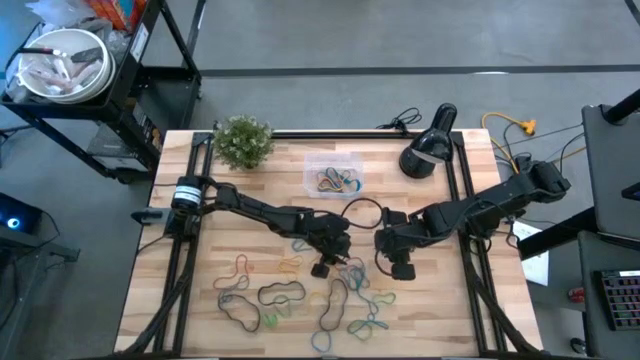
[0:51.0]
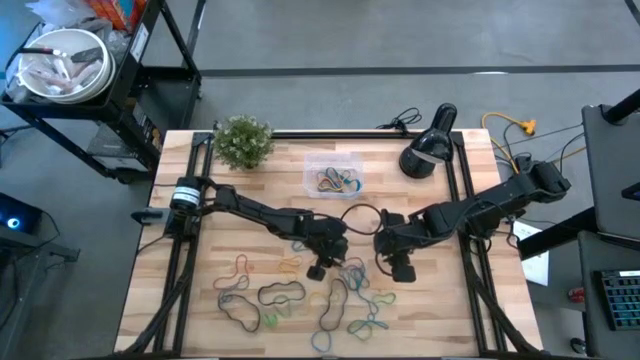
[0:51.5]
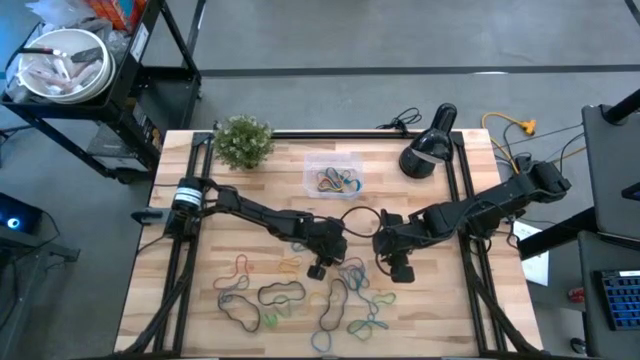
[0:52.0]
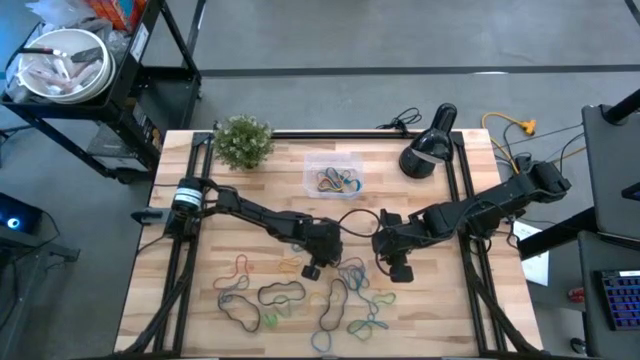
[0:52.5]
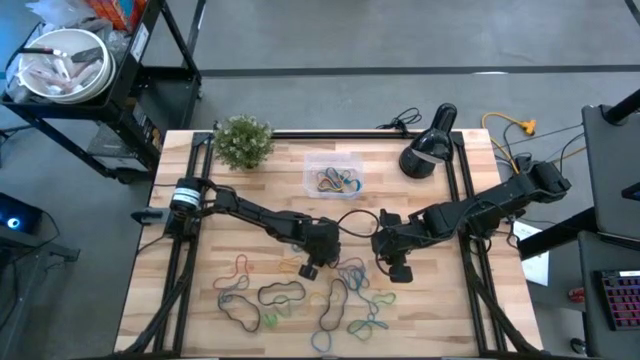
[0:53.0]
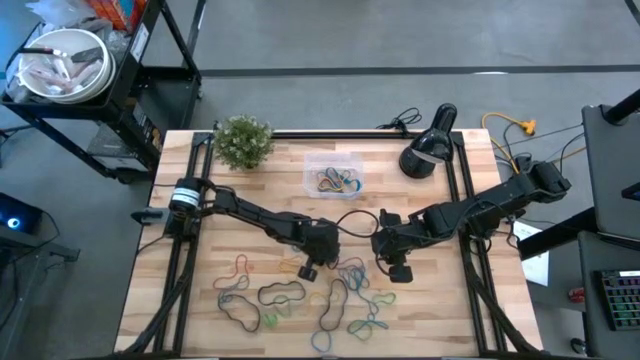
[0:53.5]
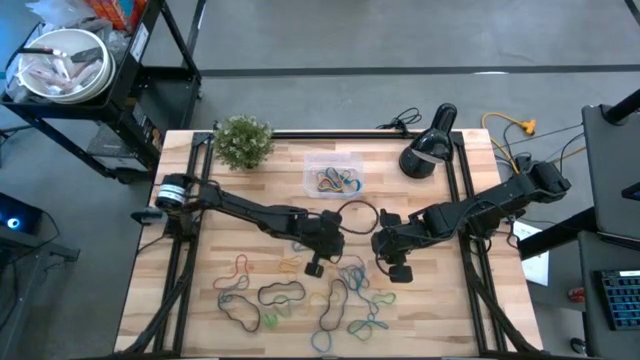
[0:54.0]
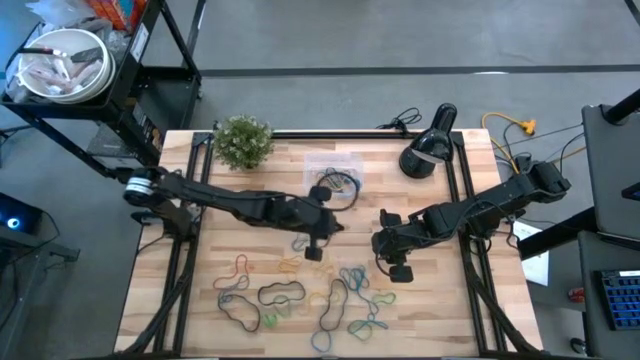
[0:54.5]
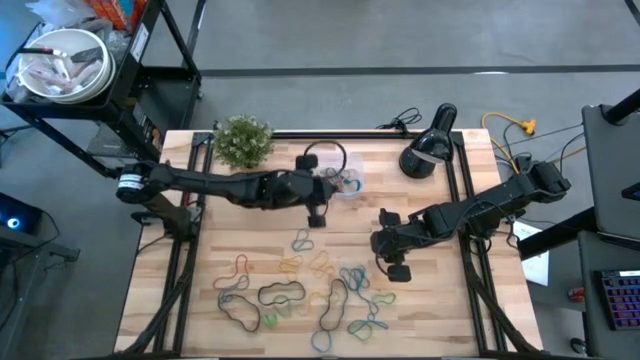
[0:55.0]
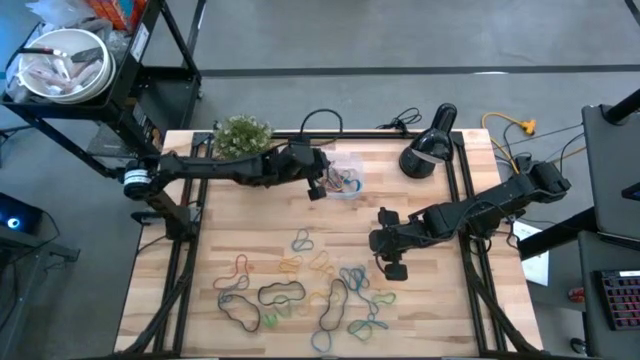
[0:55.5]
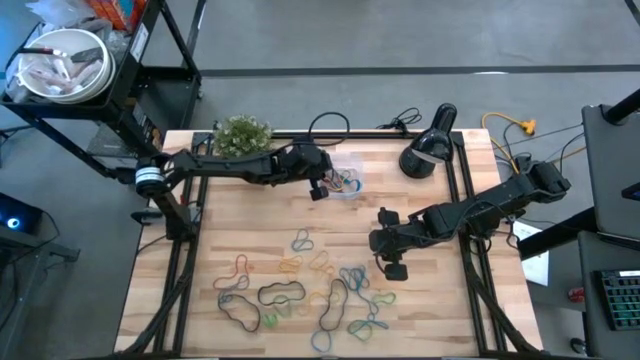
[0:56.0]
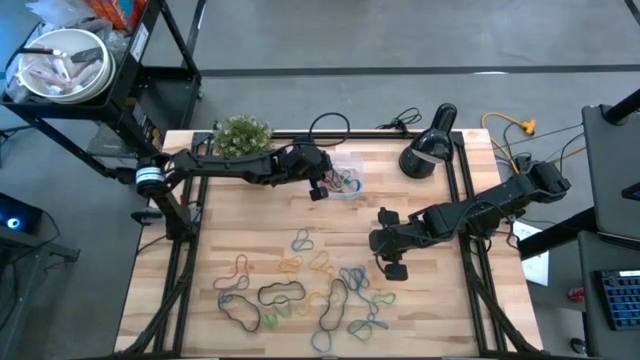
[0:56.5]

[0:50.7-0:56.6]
Task: Pick and place rubber bands into bin
Put the red rubberband into the transparent bin

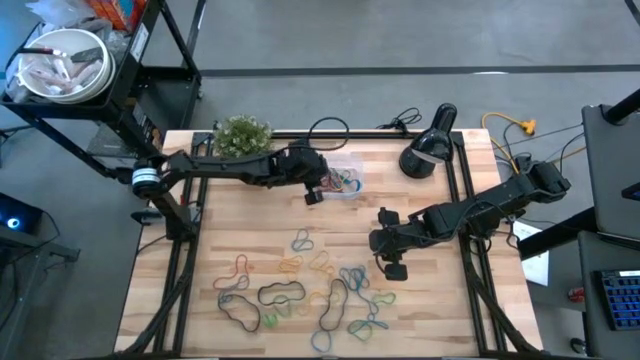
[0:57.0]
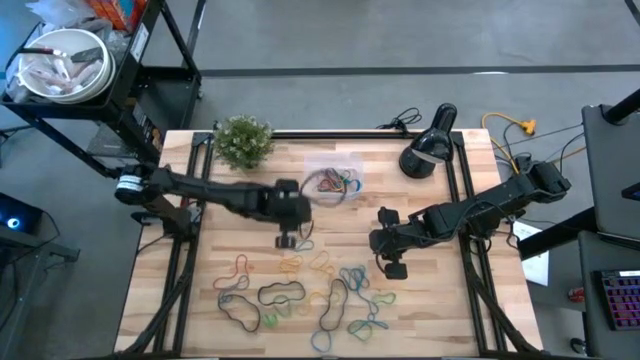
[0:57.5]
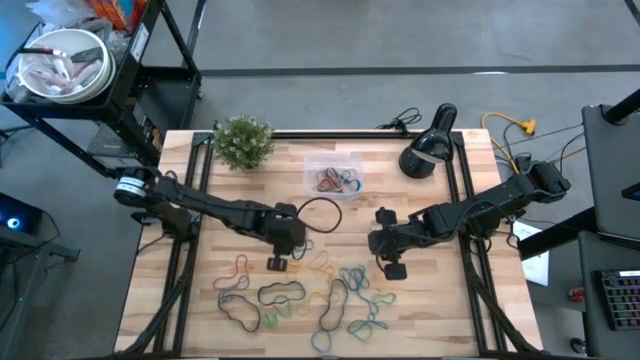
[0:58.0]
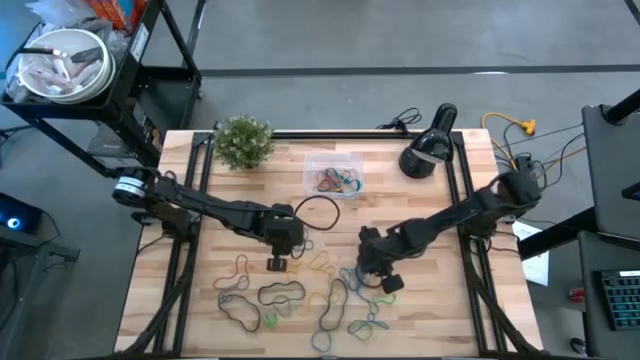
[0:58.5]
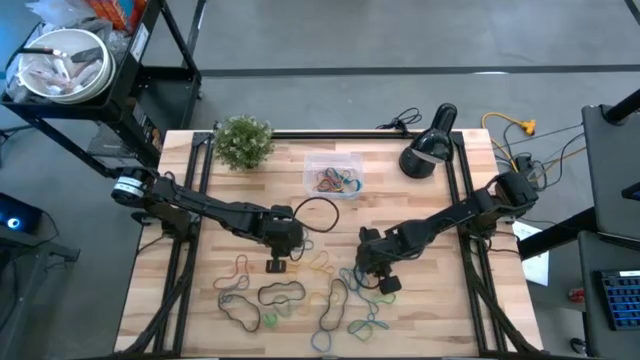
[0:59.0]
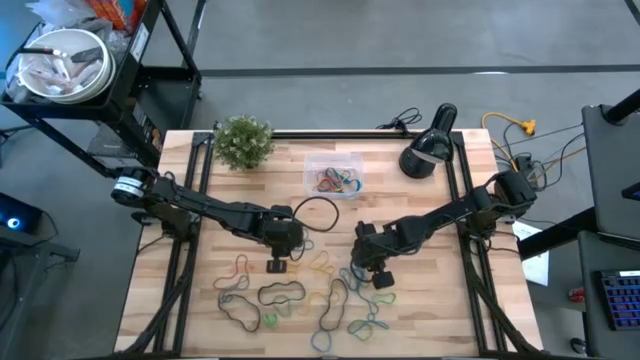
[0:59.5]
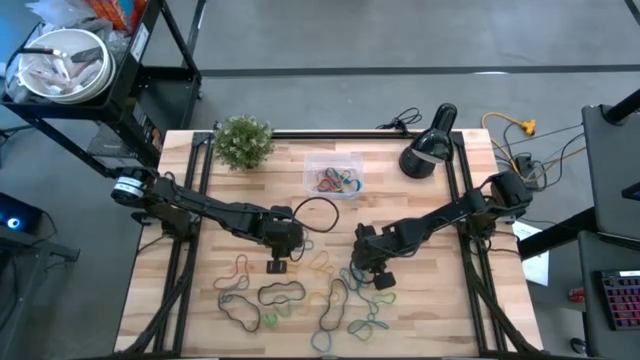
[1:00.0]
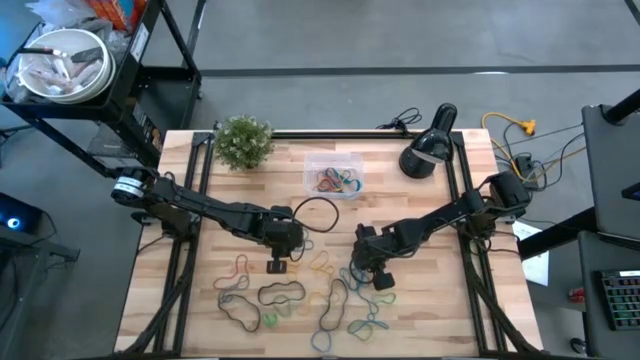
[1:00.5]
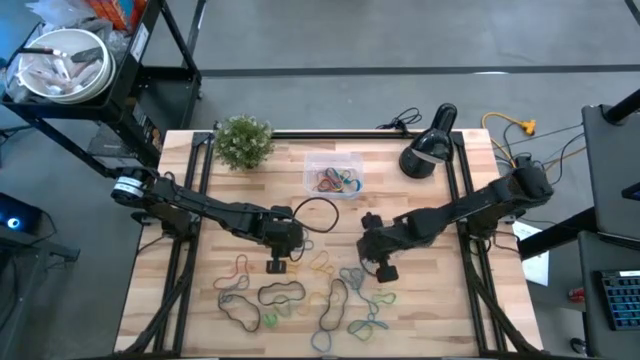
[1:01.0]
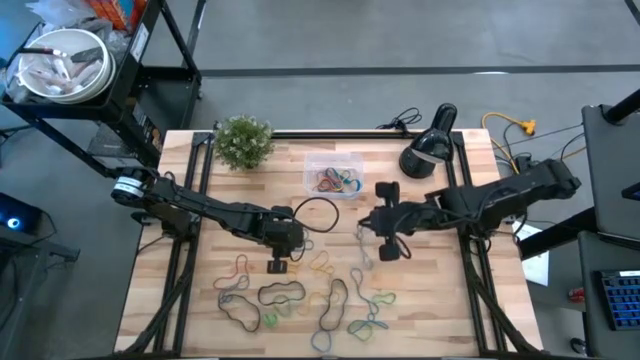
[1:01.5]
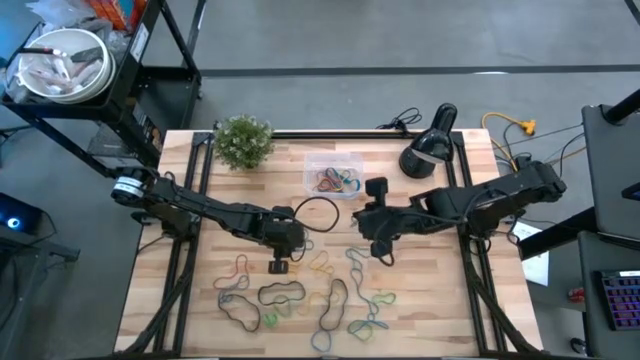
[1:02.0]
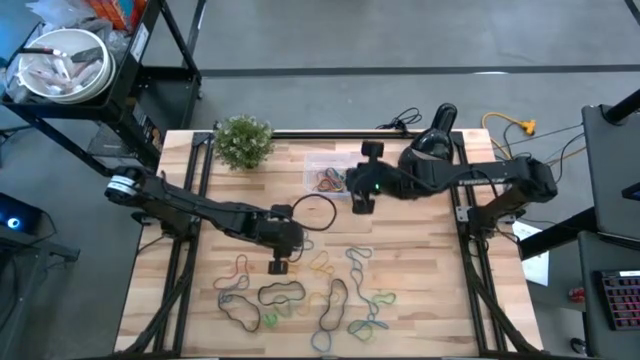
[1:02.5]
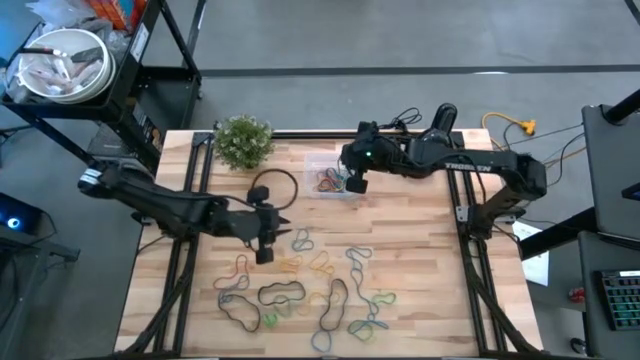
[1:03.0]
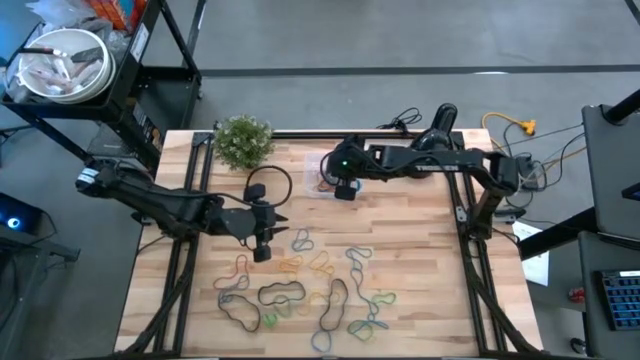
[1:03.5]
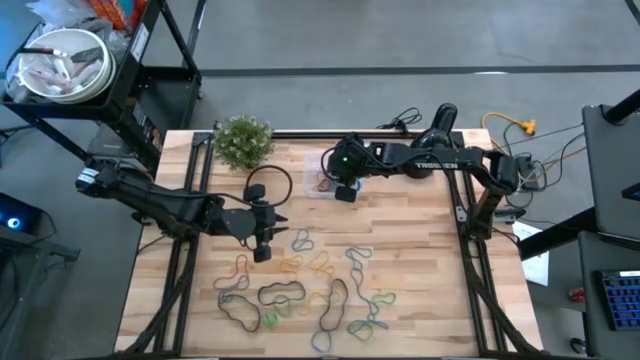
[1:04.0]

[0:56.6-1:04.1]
Put the blue rubberband into the transparent bin

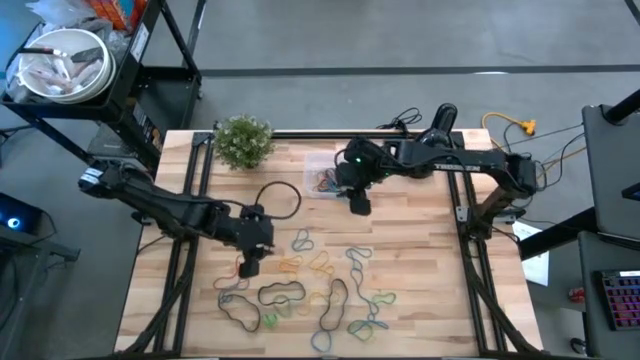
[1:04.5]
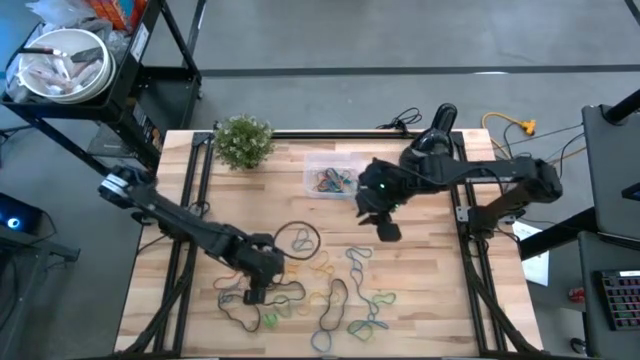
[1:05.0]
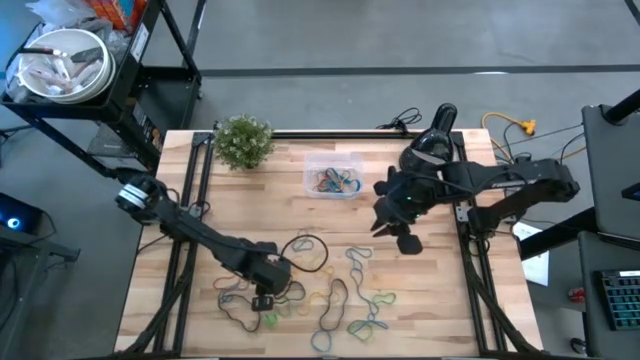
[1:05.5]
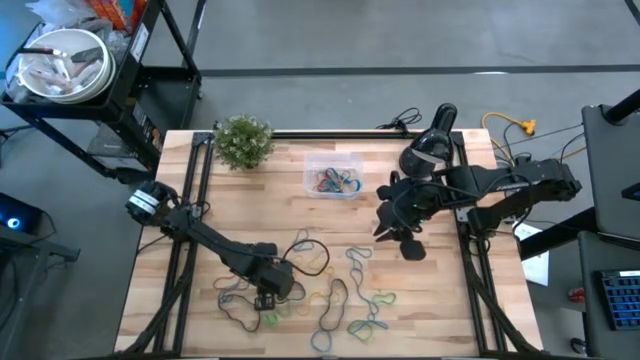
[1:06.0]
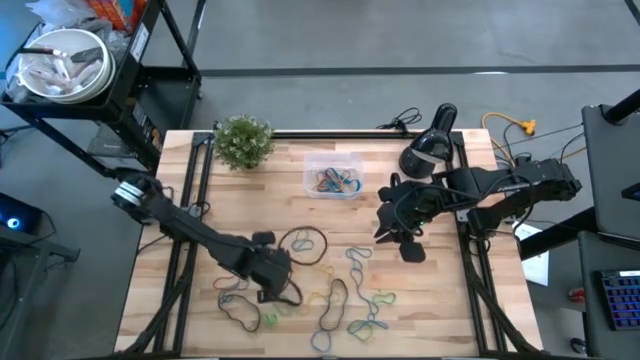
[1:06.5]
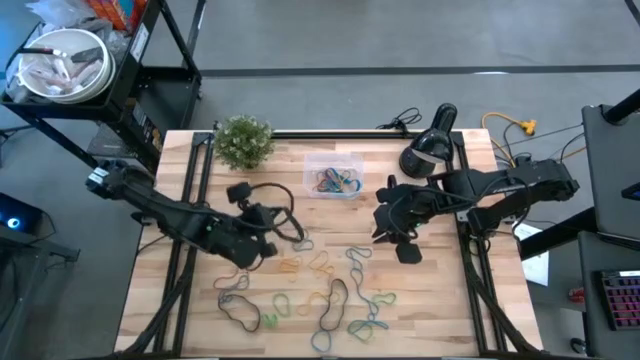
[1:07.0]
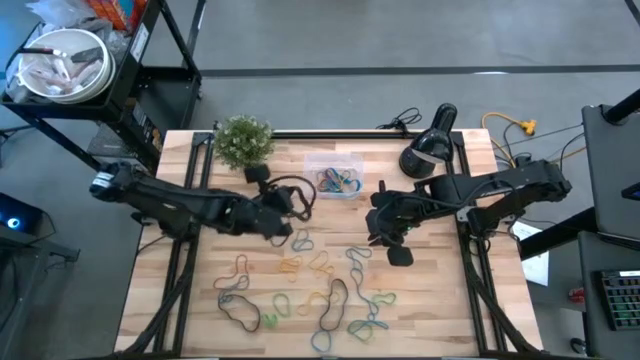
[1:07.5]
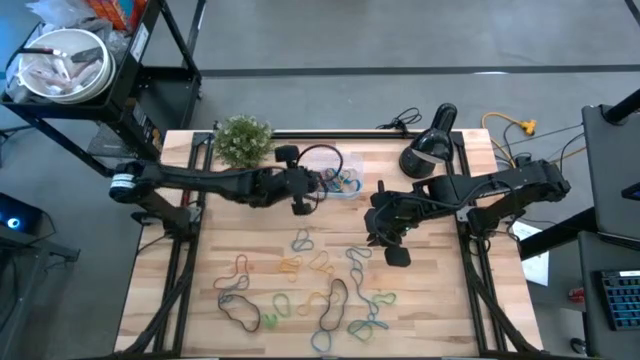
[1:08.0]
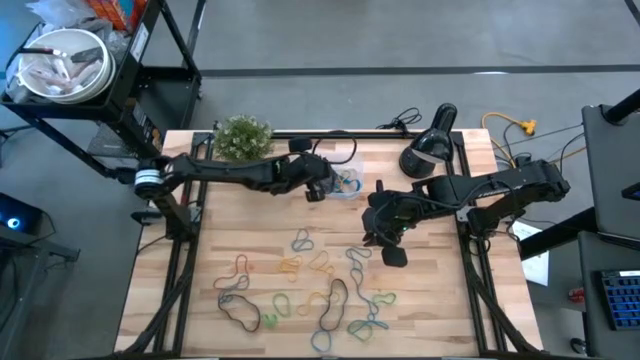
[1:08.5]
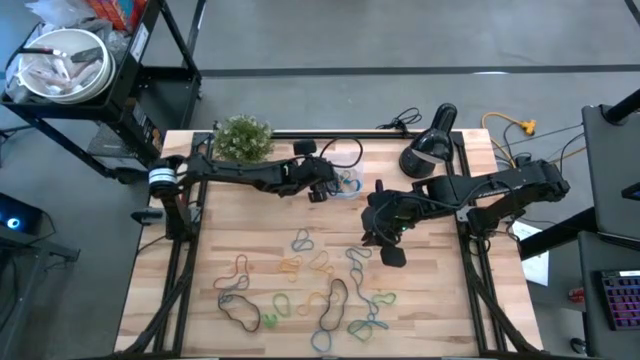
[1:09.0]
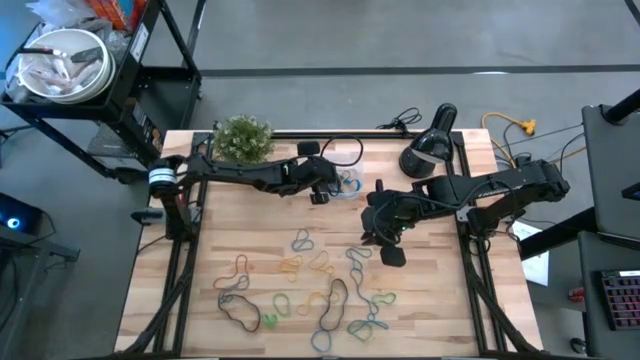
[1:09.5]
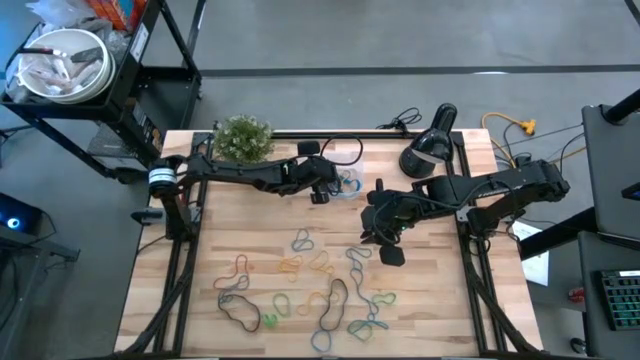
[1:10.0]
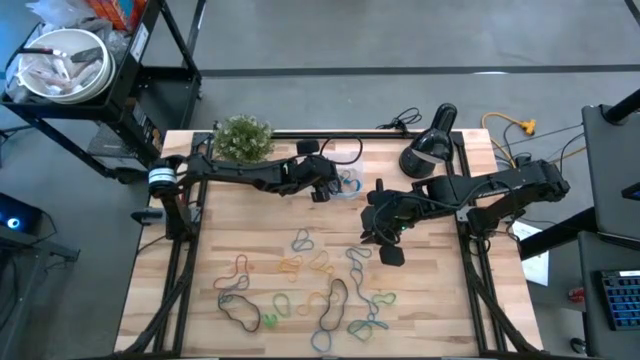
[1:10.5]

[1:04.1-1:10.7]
Put the black rubberband into the transparent bin

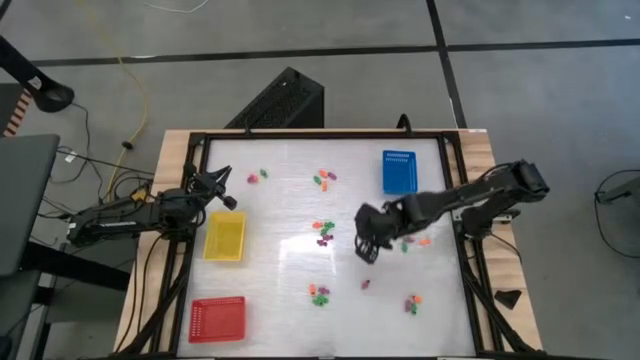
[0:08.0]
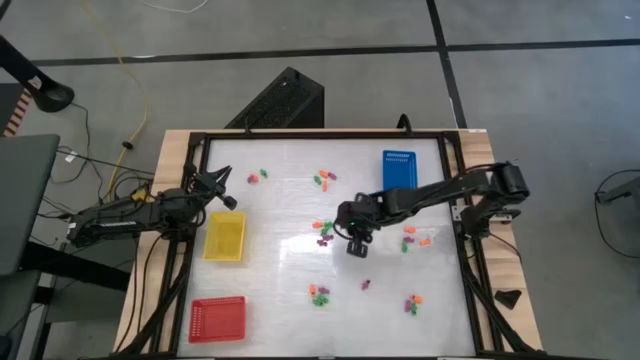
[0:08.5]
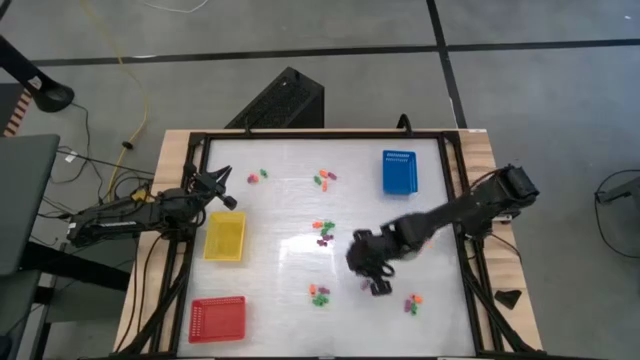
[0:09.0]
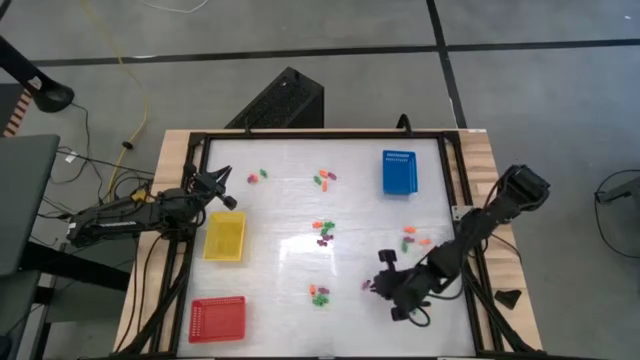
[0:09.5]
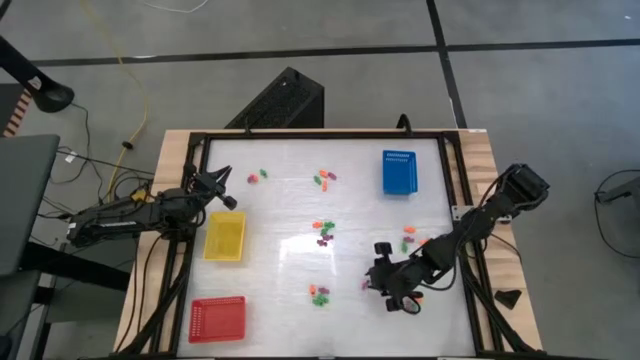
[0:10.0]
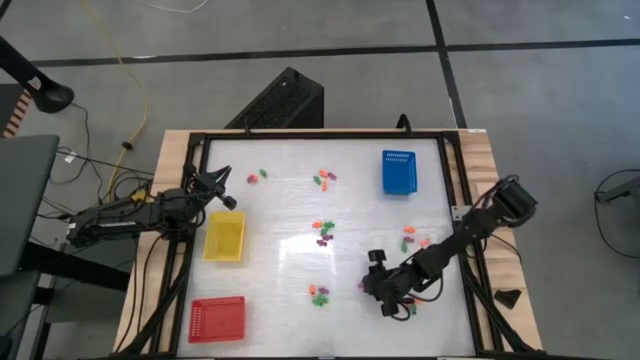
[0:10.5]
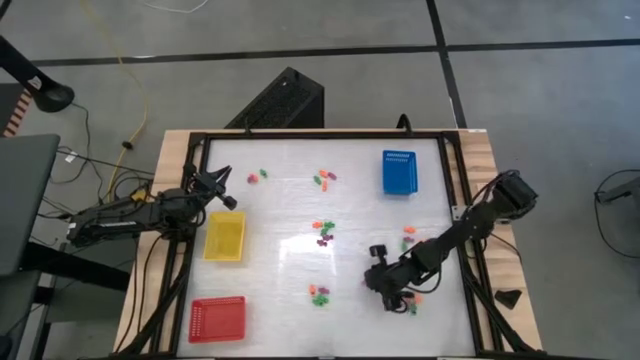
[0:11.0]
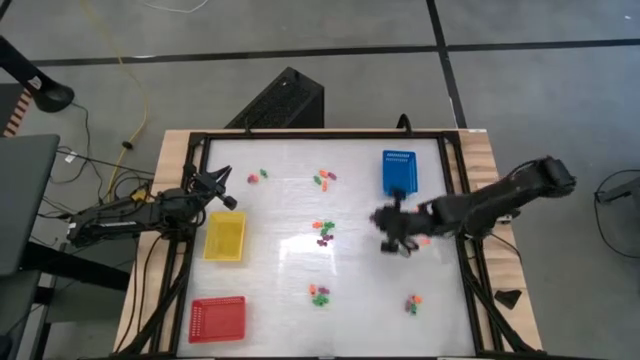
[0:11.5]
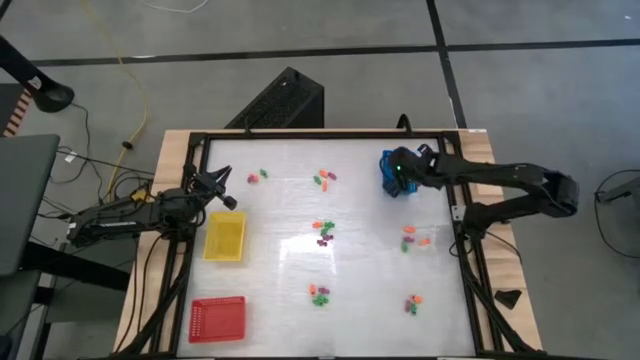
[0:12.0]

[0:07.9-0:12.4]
Task: Sort Halloween decoration
Put the purple skeleton toy into the blue bin
